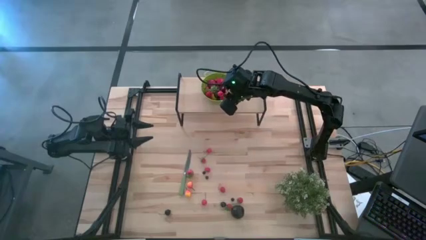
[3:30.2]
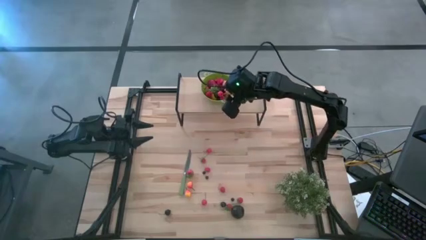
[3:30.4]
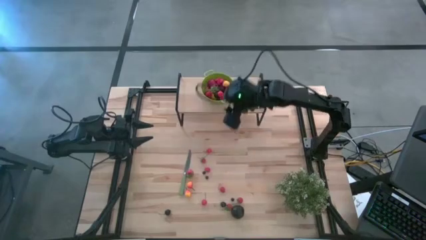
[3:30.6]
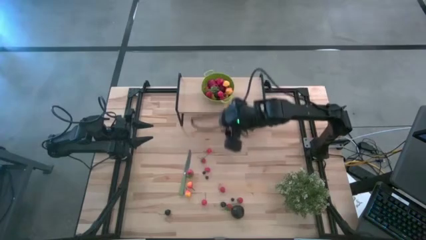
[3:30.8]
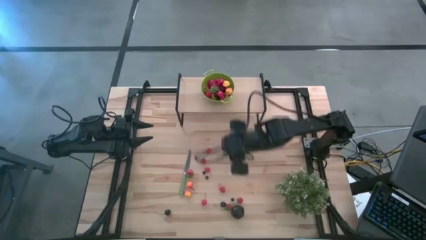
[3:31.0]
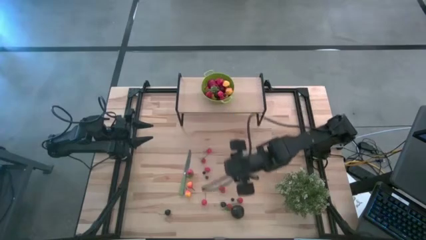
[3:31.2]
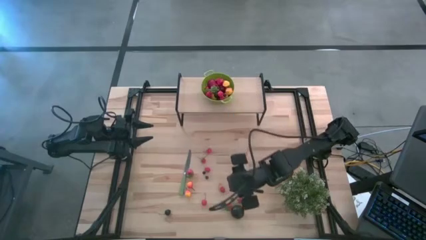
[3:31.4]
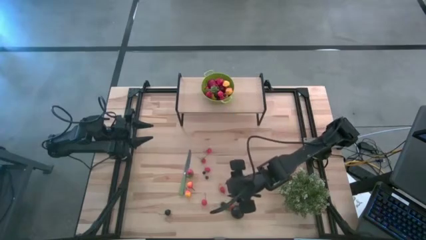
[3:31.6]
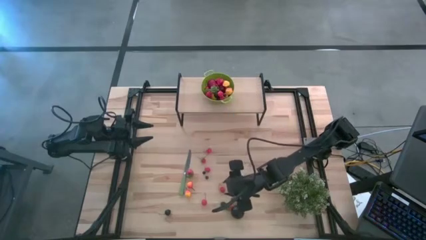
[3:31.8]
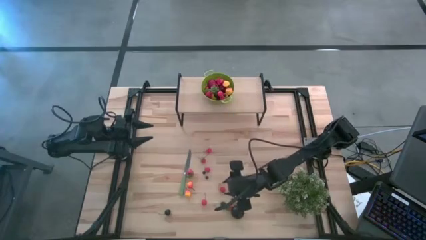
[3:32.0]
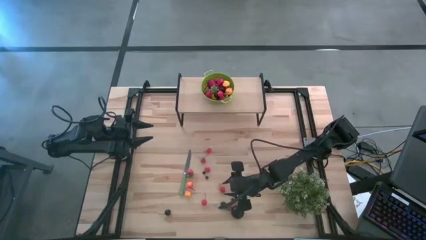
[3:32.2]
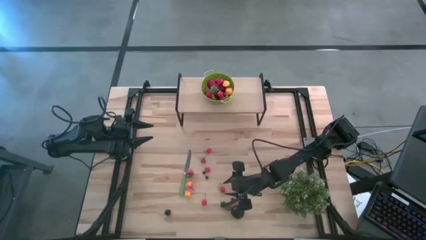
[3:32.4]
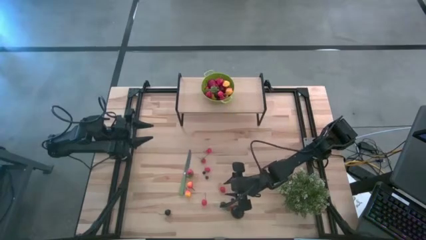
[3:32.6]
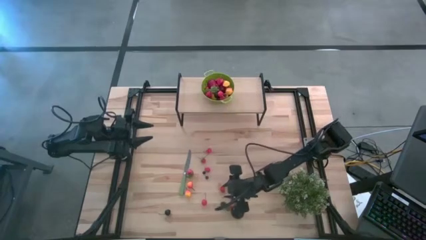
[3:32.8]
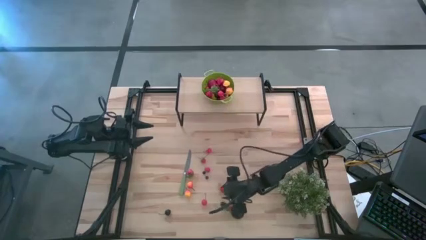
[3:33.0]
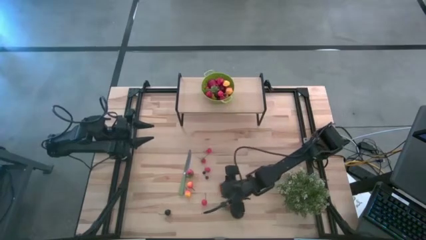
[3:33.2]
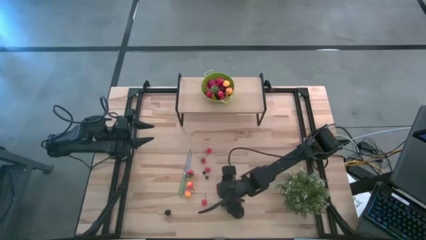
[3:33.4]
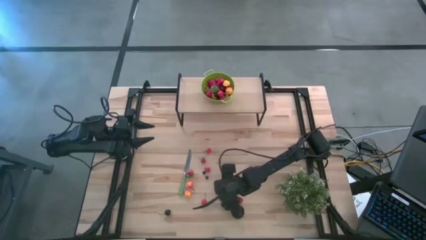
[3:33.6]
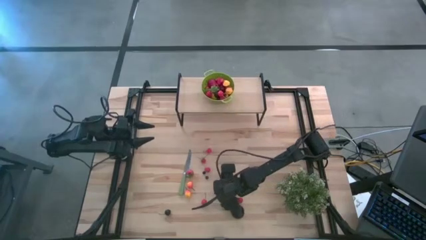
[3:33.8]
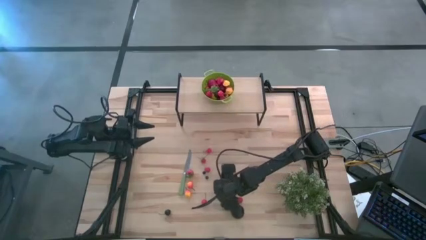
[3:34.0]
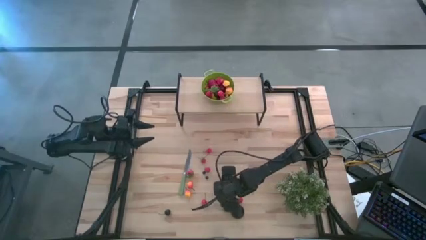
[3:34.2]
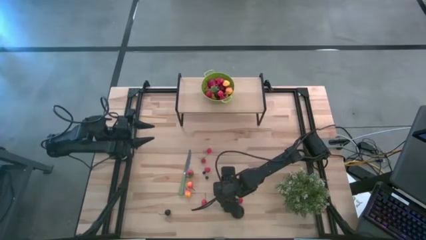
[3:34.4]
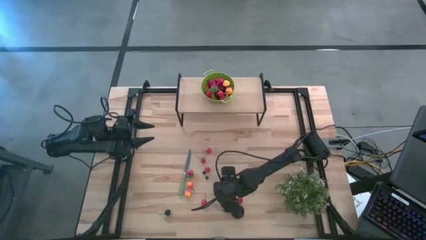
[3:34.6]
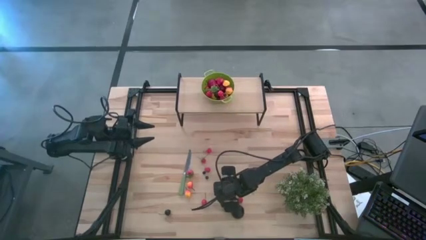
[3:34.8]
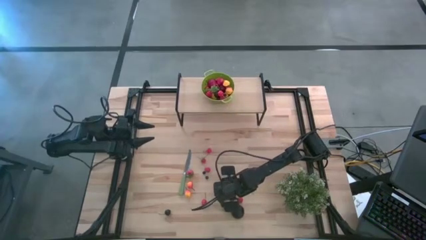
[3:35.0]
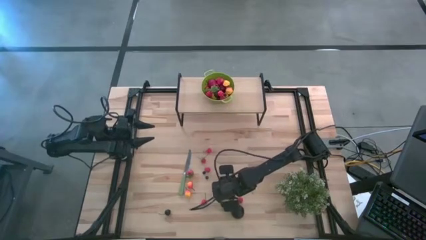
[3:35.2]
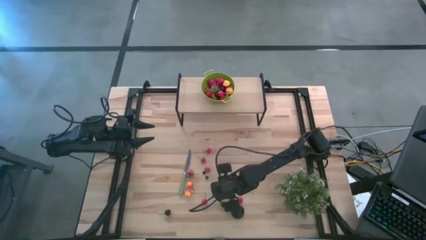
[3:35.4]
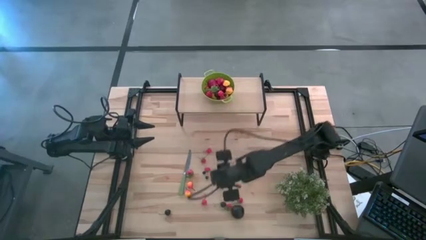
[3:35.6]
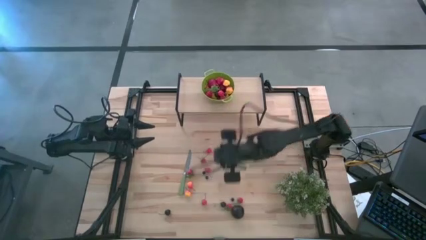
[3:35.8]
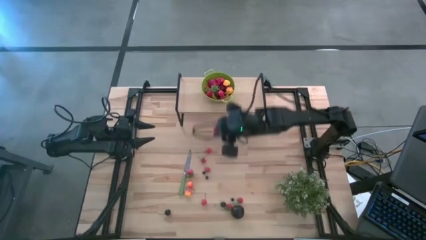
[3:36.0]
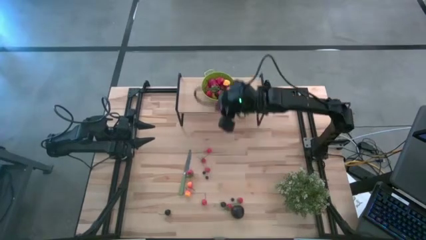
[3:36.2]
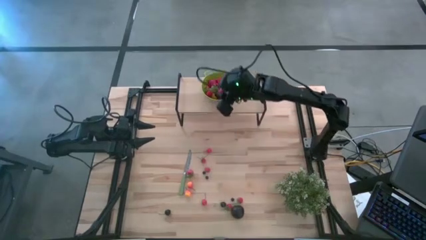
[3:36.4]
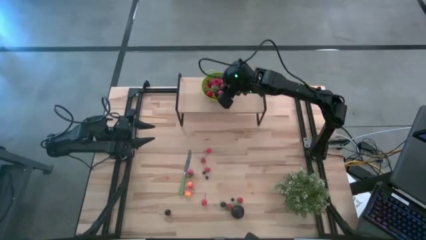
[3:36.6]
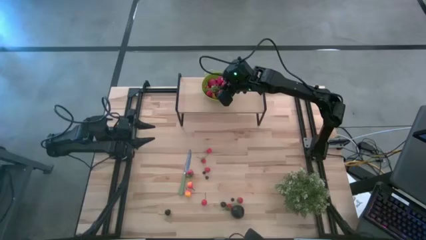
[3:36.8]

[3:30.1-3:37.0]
Task: Pick & Place Fruit
Put the raspberry into the green colander on the shelf

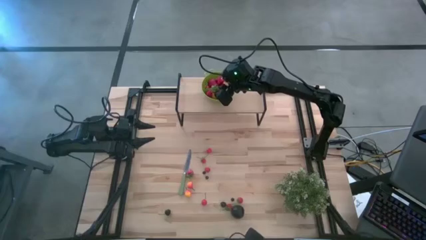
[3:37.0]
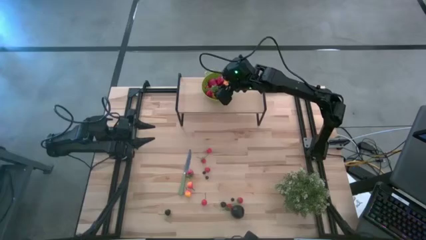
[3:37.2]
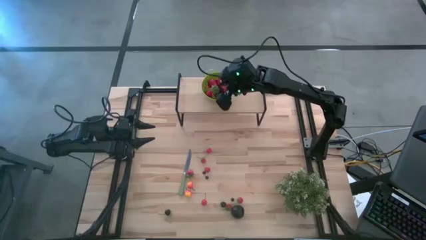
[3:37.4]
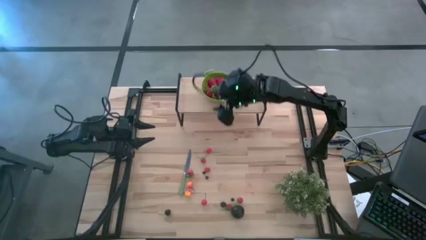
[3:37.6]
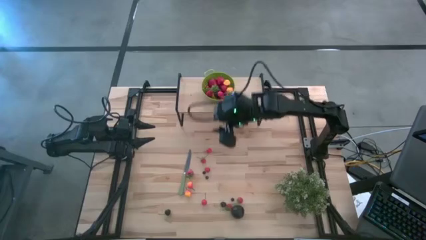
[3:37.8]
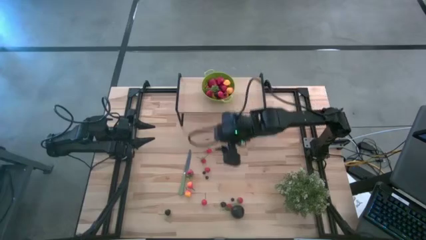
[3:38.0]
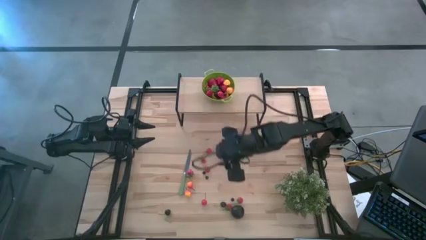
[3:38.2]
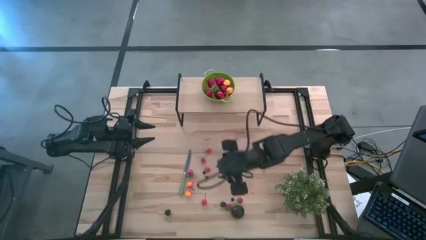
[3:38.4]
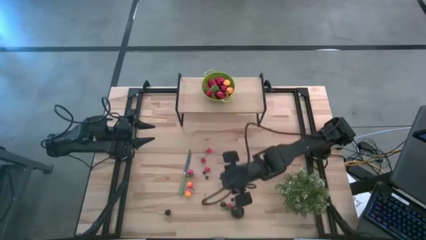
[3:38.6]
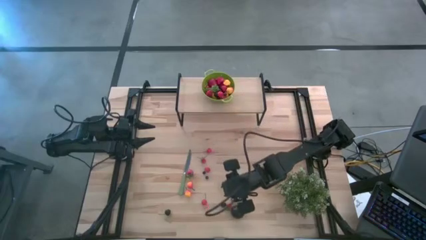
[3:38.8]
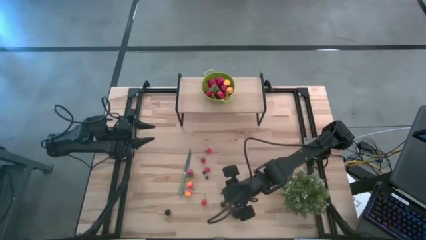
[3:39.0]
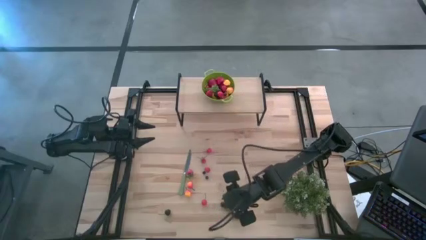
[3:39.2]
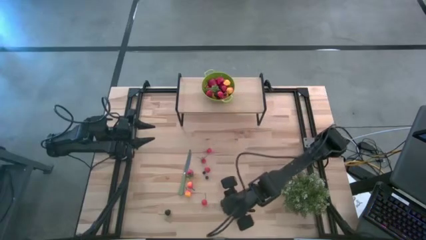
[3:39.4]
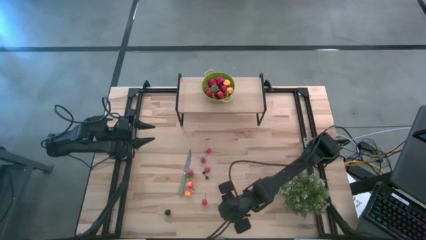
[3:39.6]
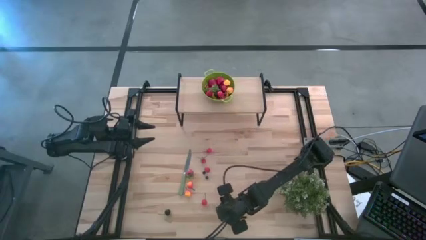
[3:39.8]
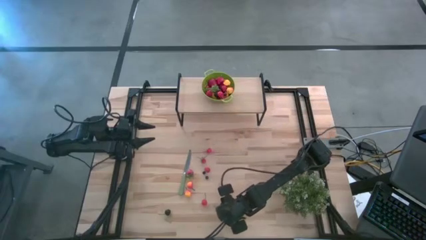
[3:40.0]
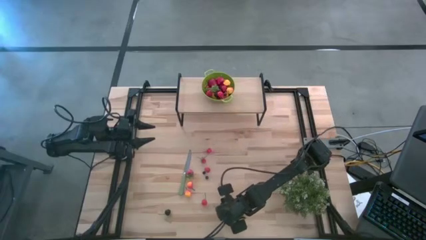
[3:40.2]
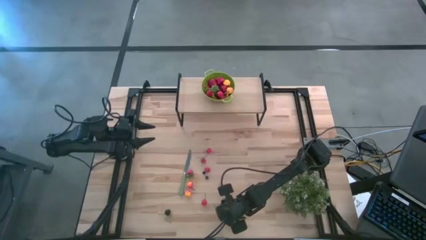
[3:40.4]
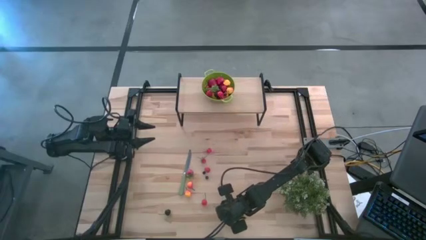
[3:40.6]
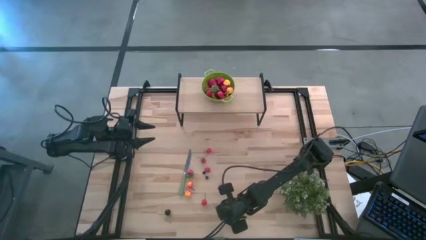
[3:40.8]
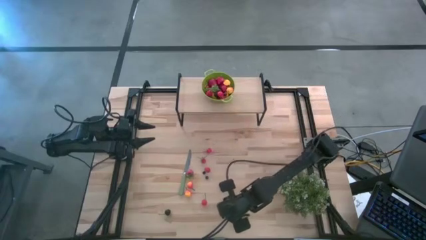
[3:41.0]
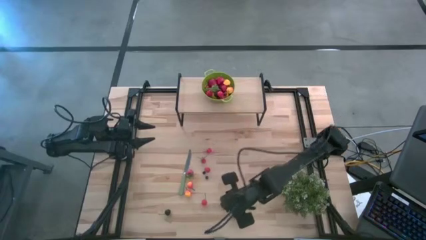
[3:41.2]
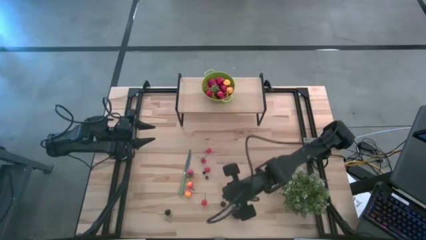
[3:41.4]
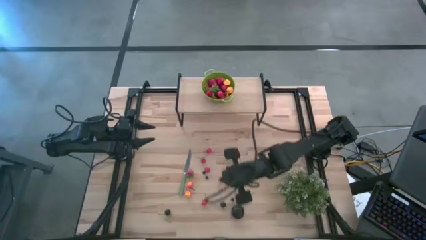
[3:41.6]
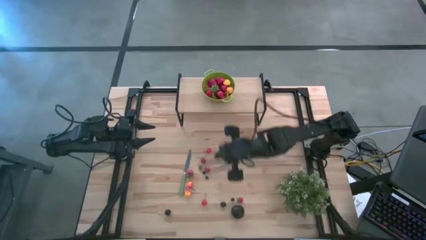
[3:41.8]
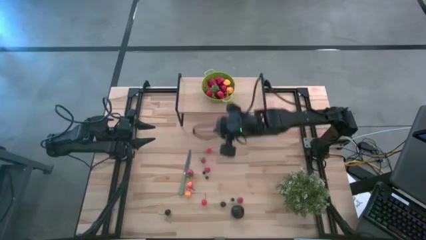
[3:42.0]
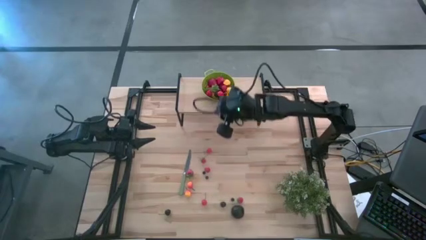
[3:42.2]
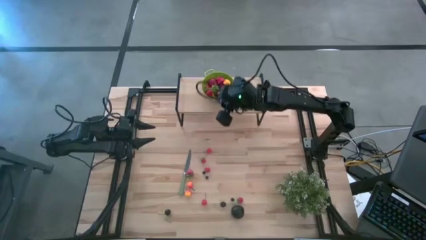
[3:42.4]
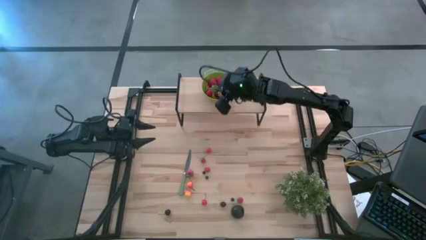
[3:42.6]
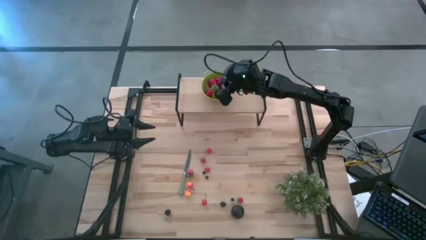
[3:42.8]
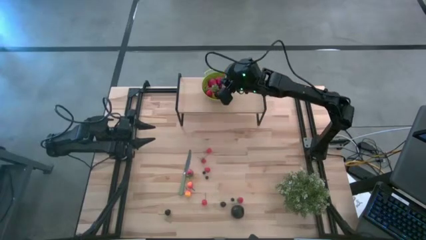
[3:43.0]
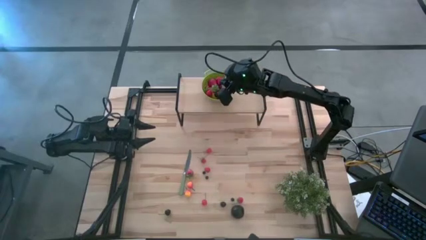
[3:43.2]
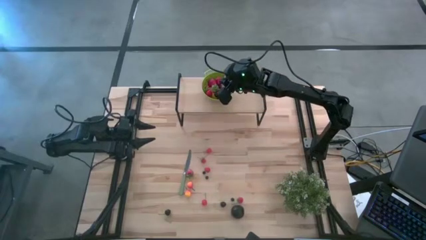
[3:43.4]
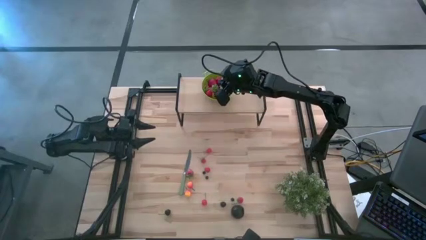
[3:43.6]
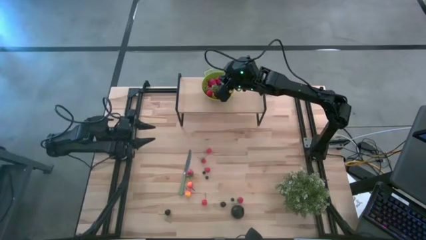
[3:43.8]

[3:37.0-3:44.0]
Put the strawberry into the green colander on the shelf
